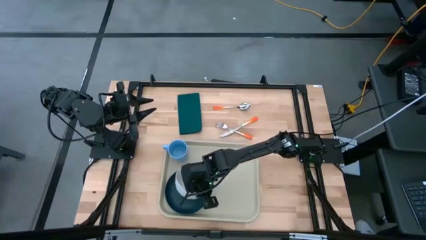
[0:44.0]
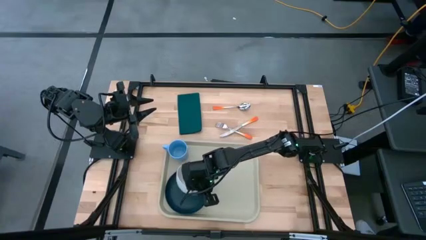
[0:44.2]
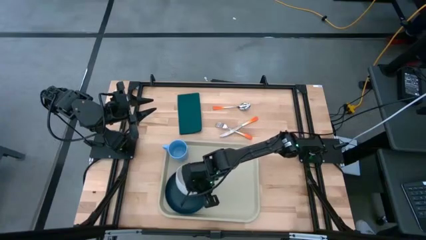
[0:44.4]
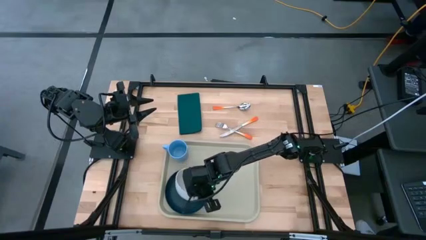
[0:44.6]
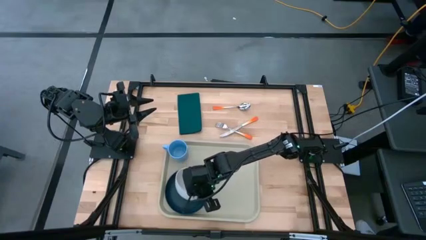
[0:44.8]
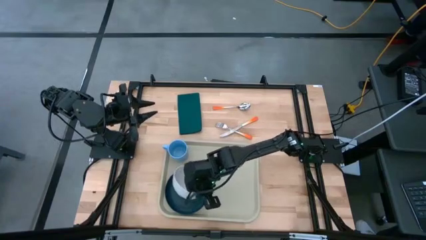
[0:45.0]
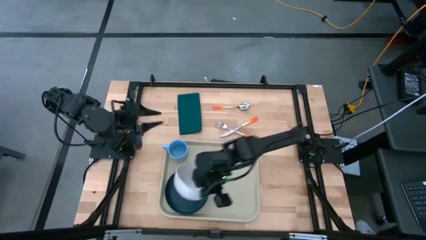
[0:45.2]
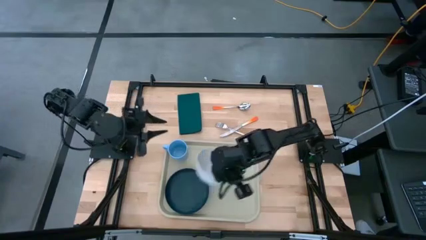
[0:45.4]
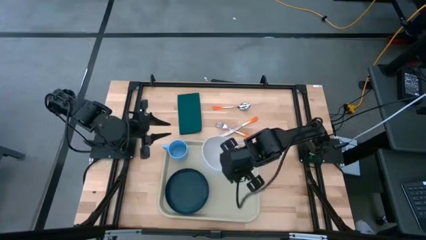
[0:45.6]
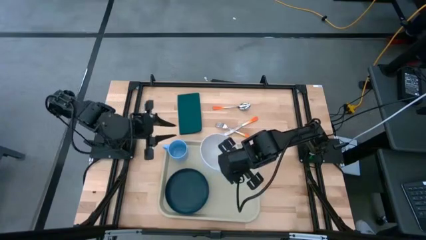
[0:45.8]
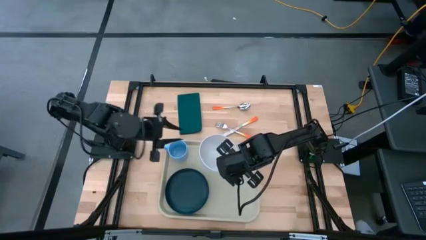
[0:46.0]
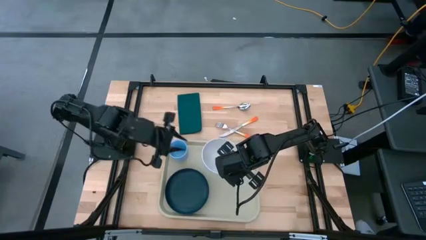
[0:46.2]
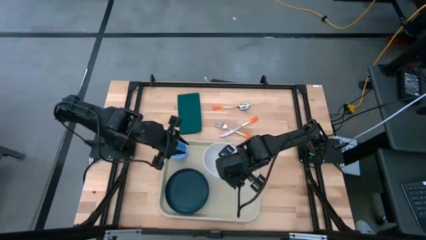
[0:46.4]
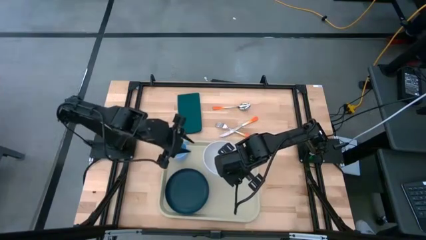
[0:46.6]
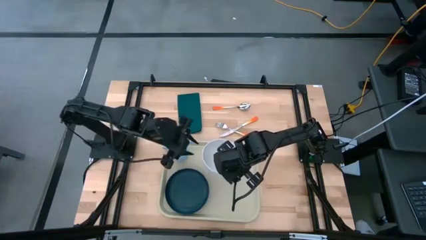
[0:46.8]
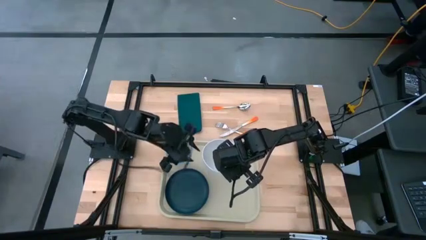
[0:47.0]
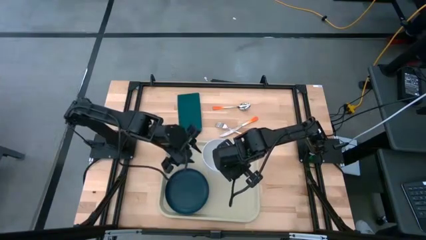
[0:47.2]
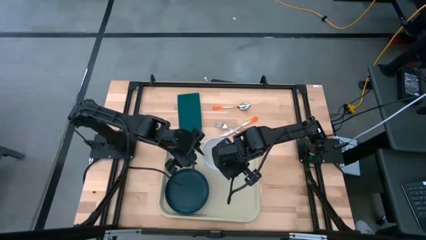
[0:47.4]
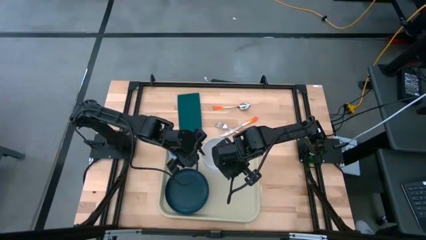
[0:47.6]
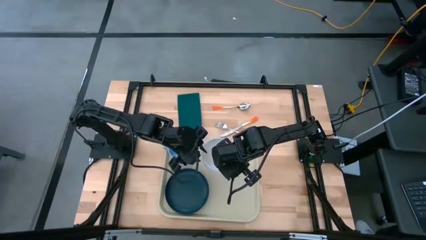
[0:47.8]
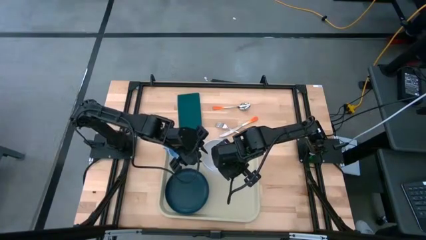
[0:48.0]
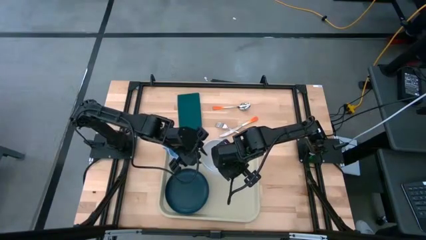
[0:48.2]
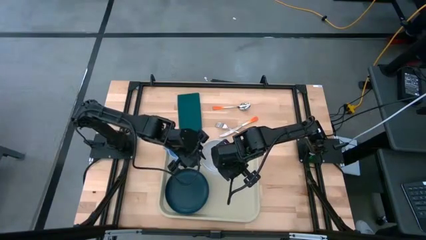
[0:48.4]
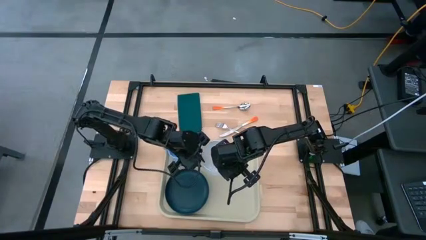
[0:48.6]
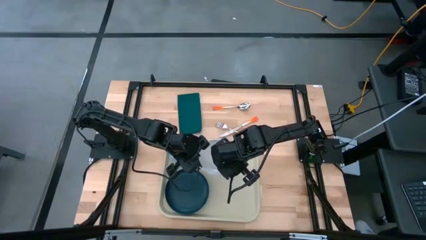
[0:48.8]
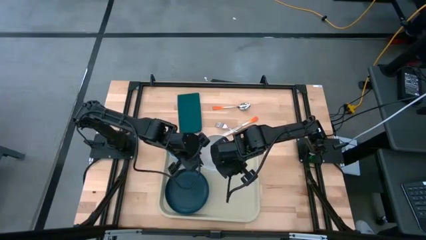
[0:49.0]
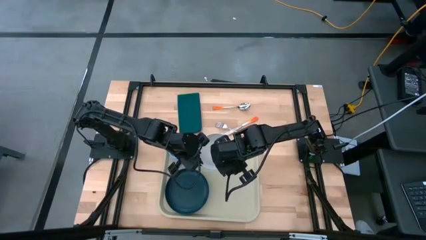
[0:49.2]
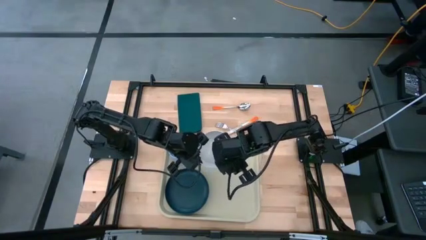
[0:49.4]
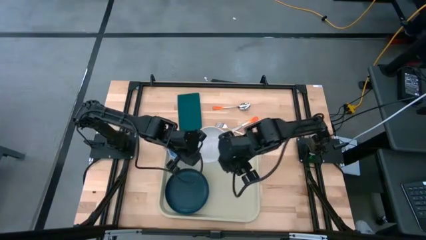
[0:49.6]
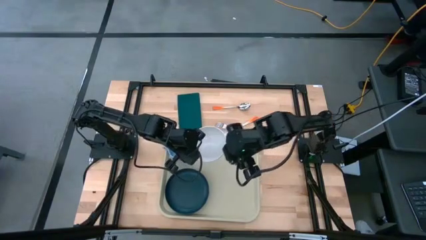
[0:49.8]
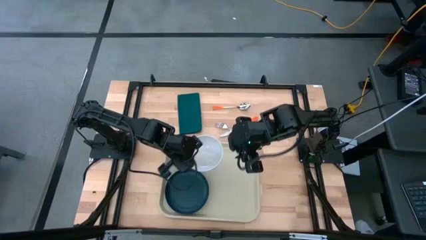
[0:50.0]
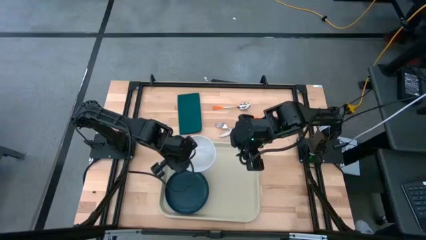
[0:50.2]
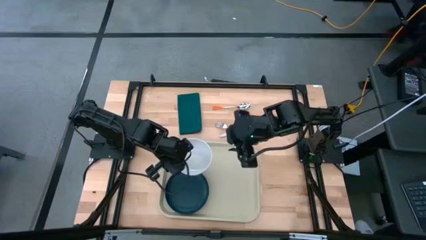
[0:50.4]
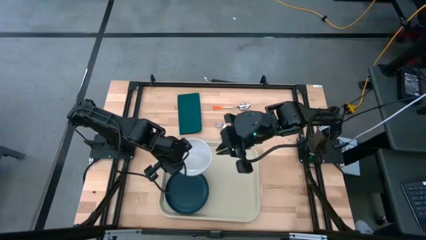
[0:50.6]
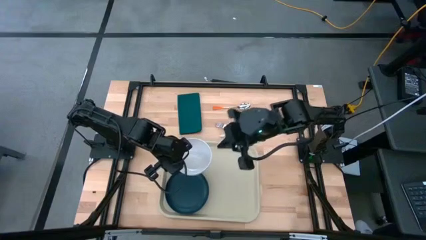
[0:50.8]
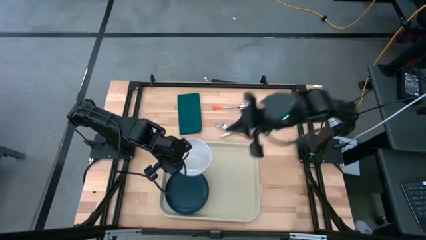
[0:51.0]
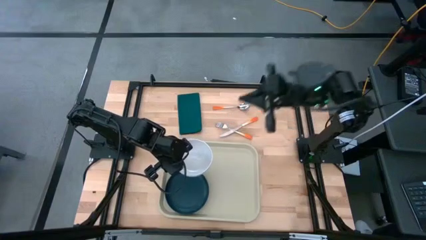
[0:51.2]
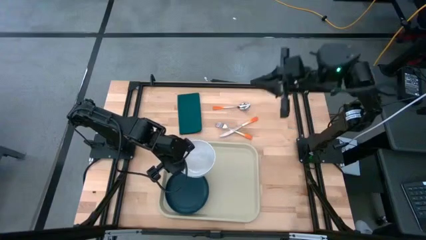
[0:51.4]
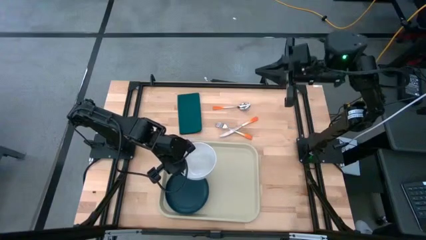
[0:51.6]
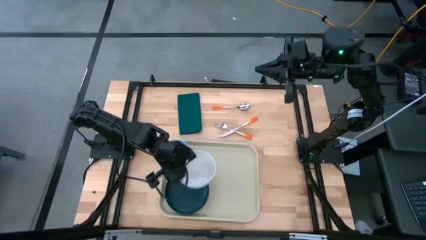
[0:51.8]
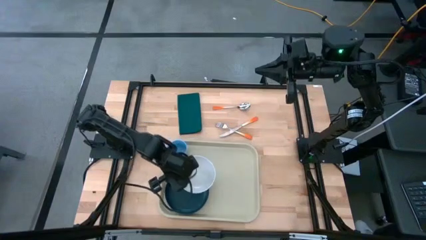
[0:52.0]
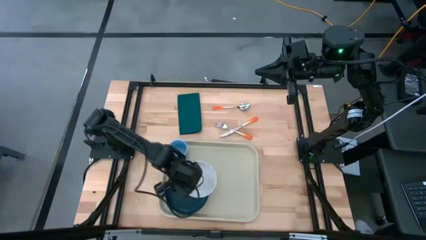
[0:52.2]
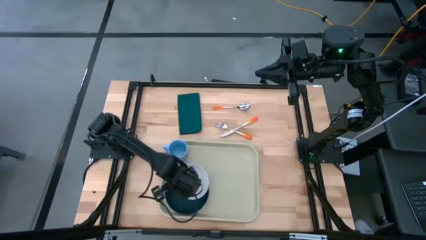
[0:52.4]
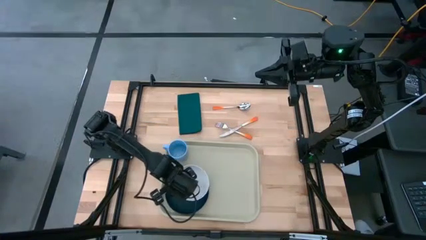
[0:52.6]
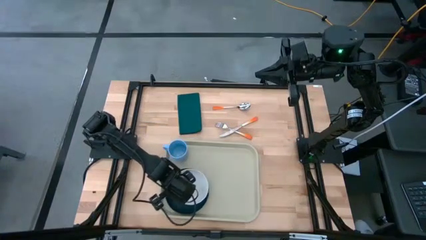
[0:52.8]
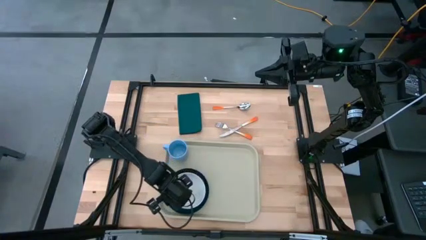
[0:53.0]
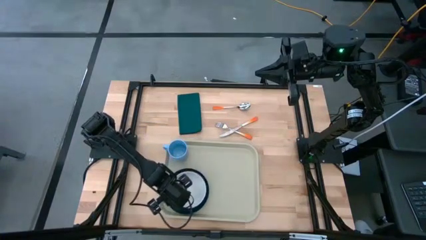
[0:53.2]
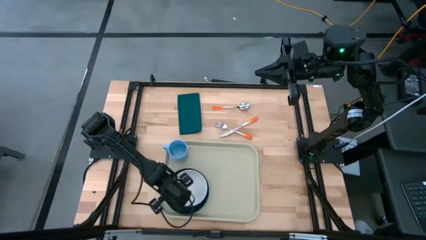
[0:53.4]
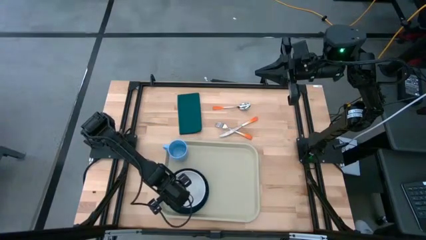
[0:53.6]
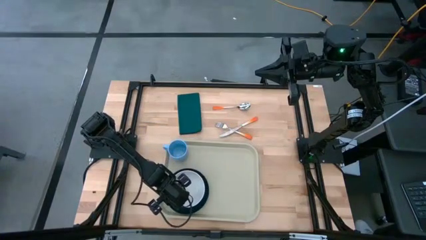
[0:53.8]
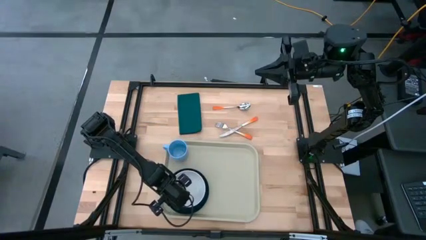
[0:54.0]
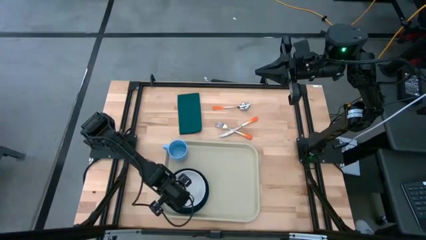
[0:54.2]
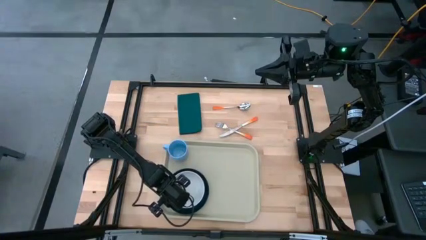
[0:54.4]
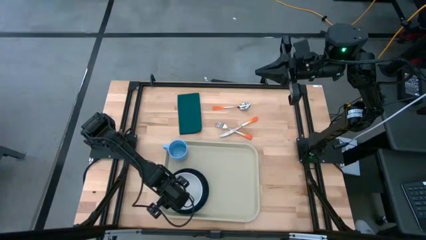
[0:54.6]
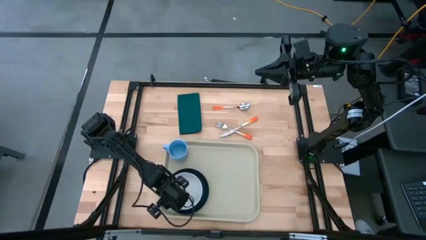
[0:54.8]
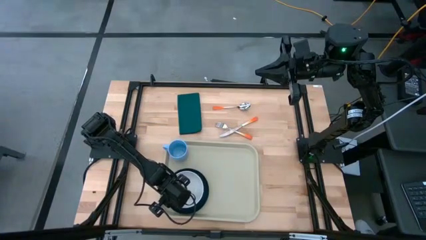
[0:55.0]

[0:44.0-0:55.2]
Task: Set up tray
Put the white bowl on top of the green plate on the gray tray
